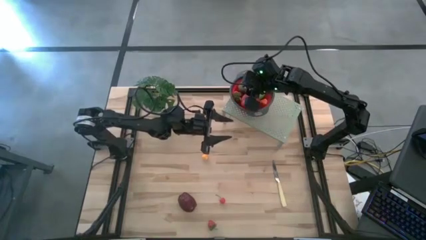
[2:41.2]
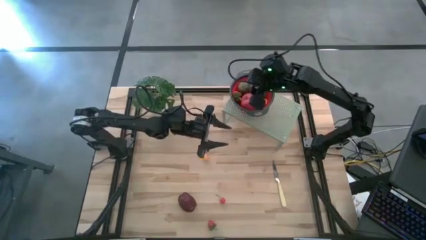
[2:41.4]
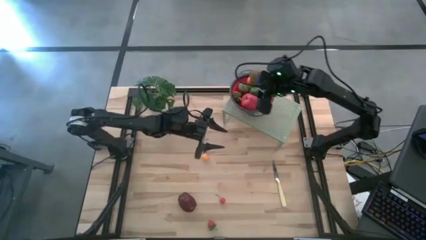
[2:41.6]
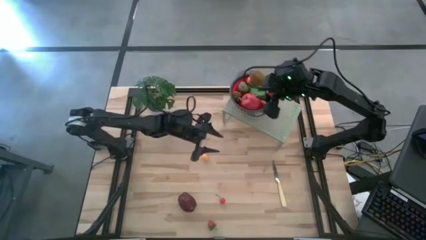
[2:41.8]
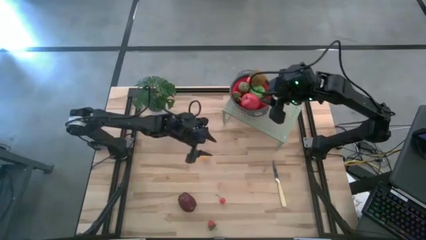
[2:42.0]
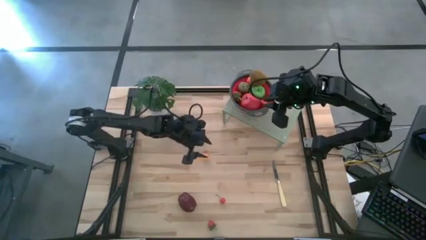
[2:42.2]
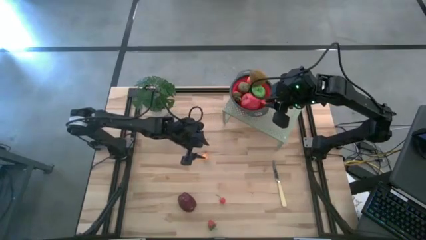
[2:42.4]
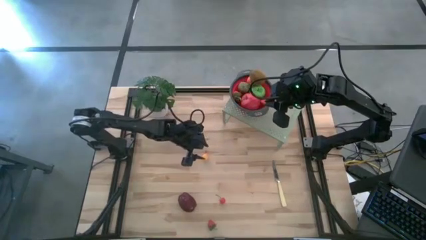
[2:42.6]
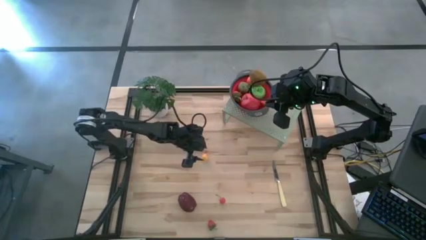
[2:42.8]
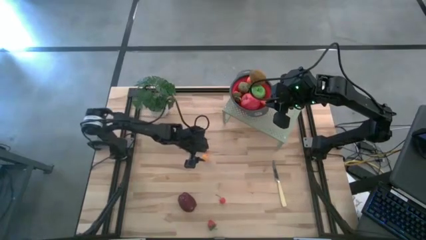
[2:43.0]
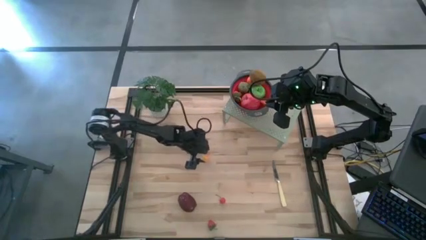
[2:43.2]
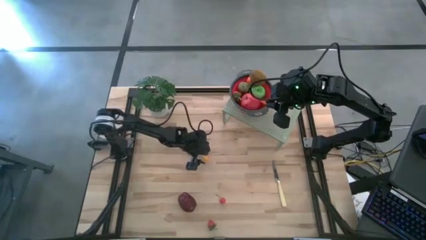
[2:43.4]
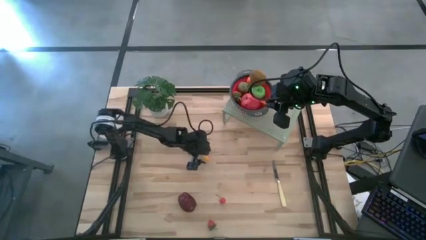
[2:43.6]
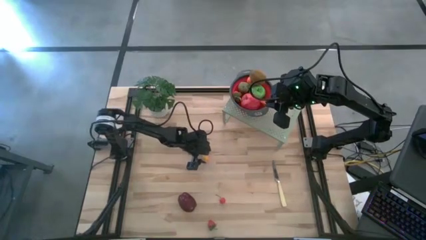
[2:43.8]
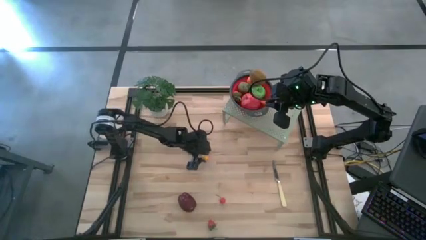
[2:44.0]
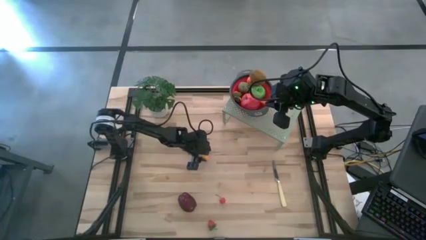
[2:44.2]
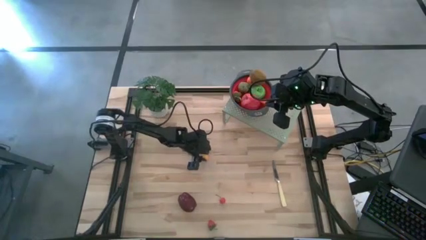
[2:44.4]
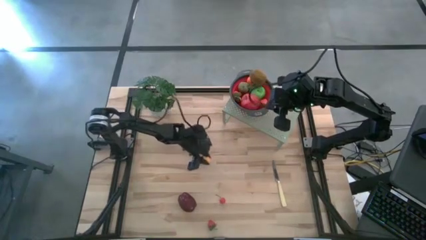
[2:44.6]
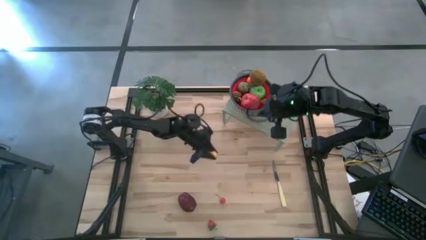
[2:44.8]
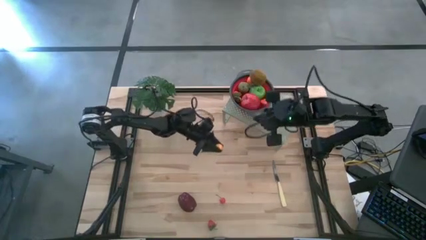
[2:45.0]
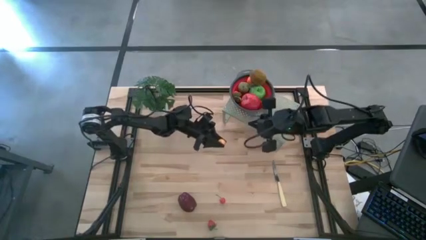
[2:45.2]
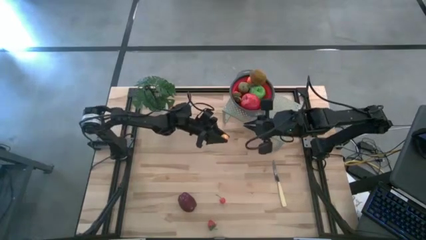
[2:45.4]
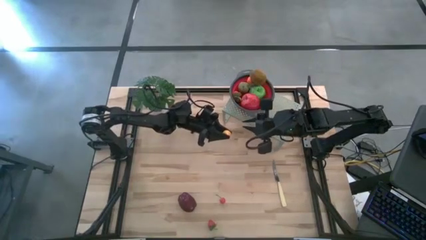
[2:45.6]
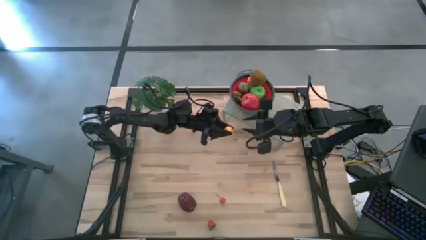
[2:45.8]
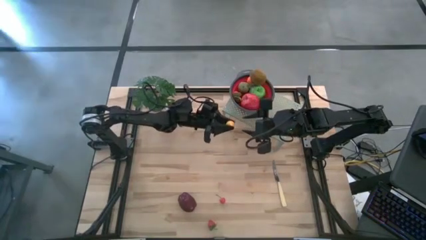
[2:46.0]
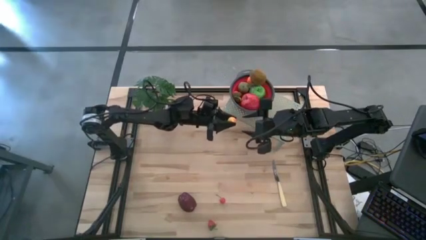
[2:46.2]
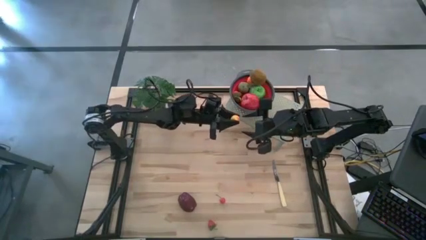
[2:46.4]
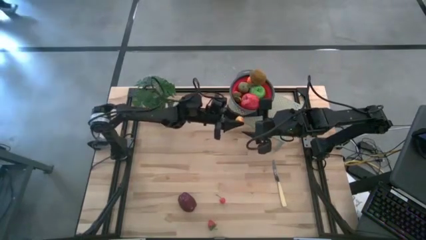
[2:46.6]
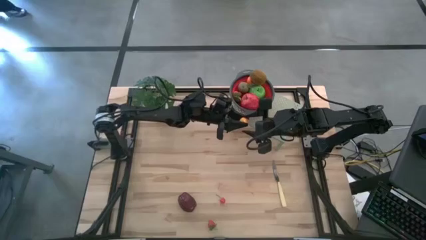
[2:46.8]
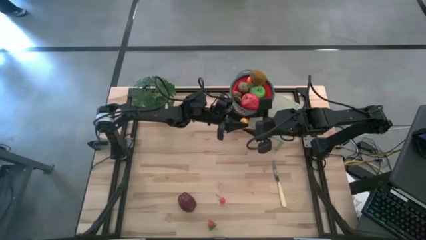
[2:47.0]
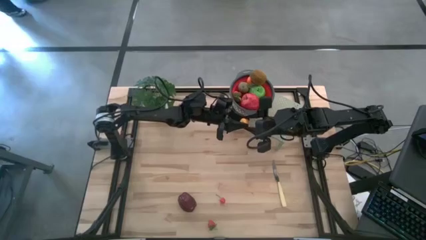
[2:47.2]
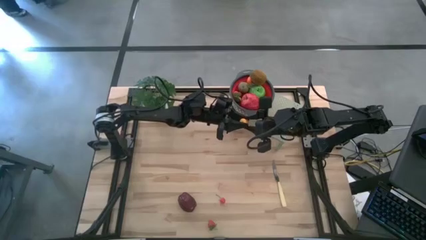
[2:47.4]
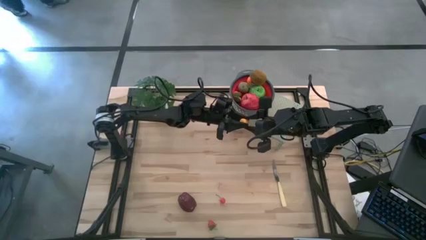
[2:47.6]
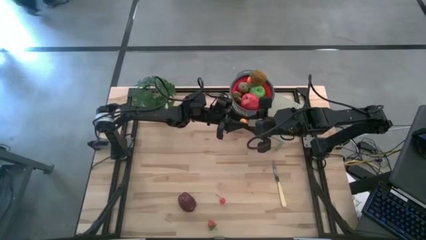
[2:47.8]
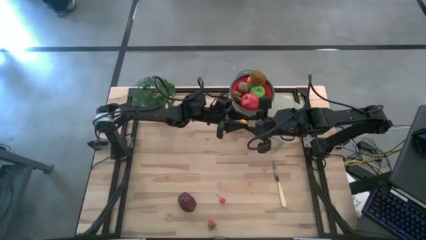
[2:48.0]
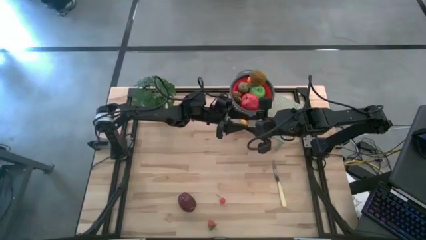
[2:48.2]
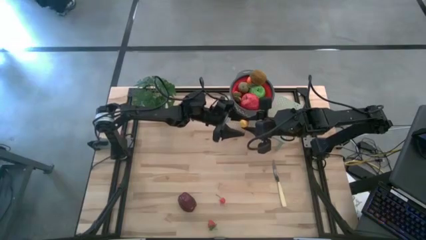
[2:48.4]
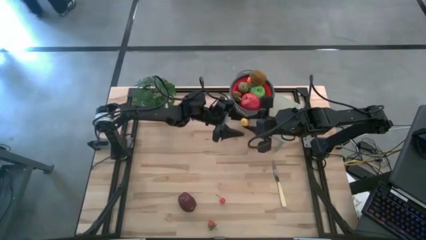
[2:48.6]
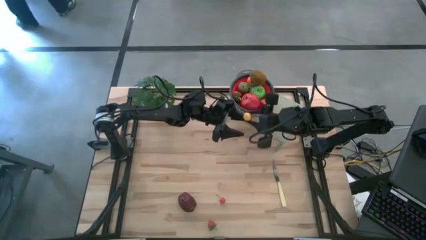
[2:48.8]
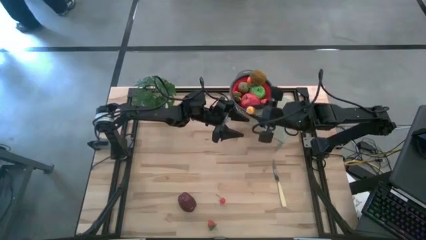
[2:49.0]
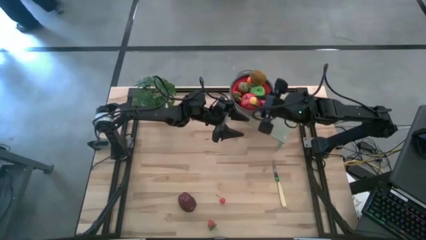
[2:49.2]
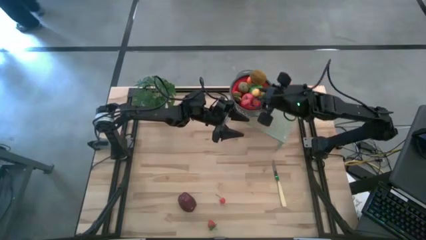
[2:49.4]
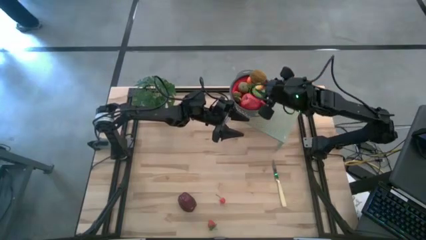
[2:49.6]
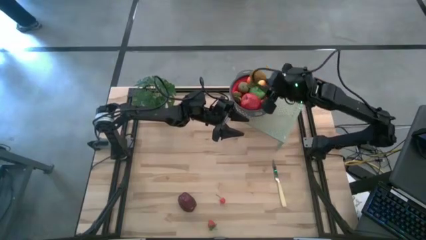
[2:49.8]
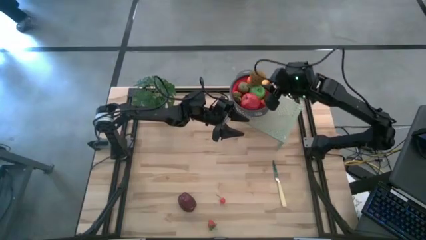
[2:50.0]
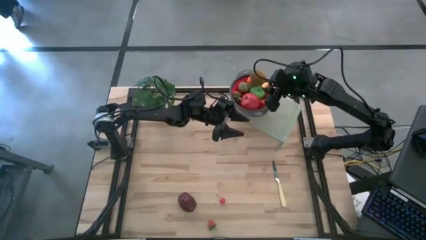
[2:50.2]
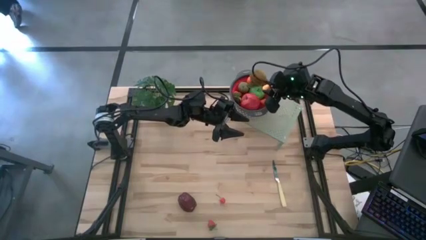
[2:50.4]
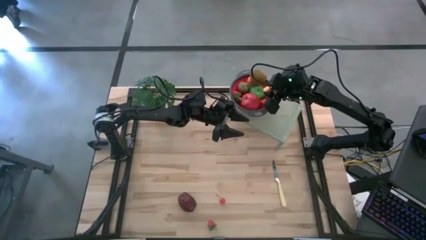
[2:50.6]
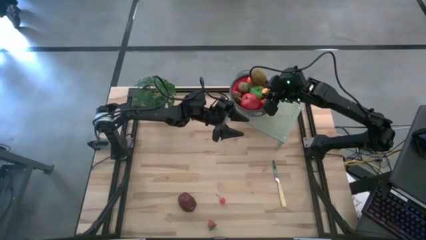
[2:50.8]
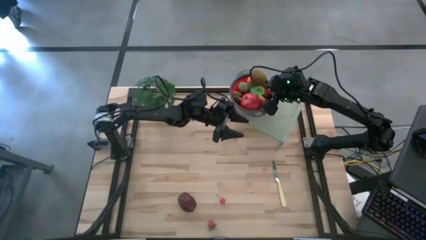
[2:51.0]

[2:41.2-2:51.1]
Task: Pick & Place Fruit
Put the yellow pear into the red strainer bowl

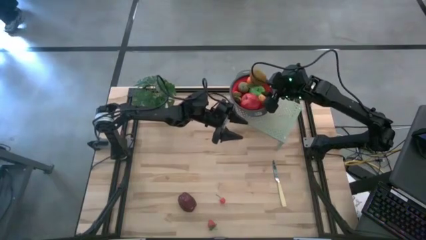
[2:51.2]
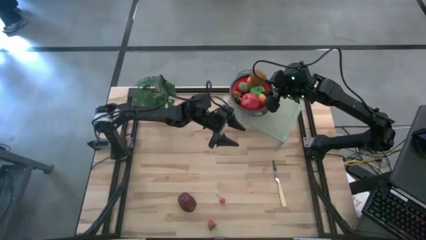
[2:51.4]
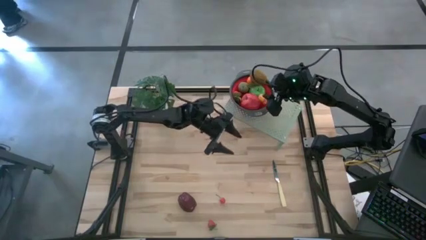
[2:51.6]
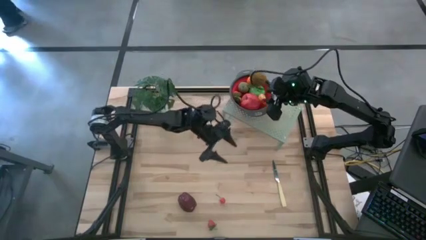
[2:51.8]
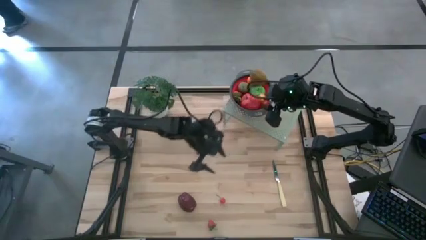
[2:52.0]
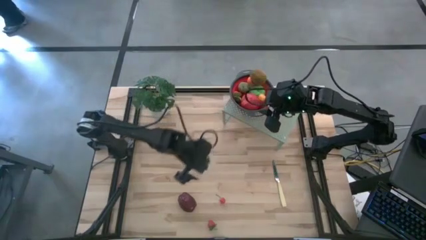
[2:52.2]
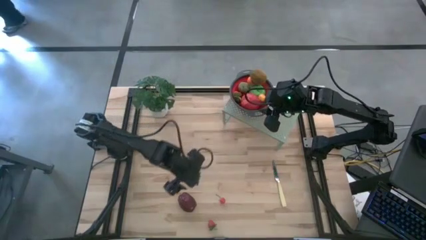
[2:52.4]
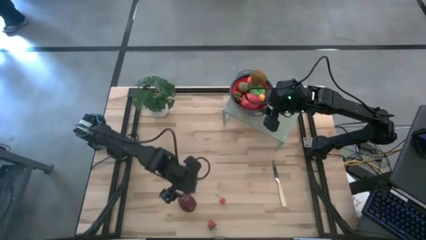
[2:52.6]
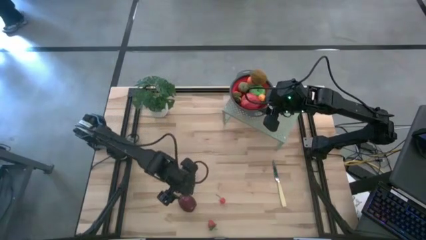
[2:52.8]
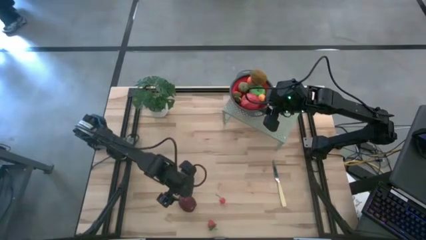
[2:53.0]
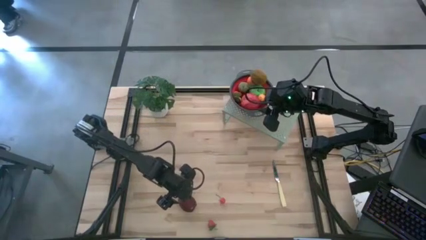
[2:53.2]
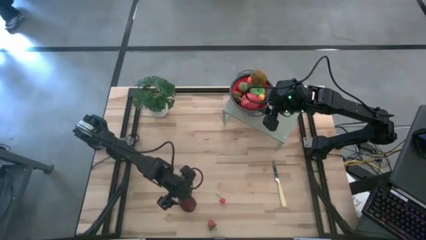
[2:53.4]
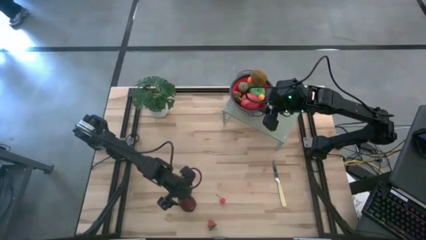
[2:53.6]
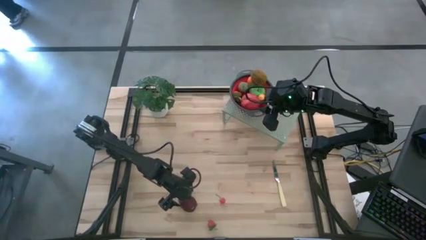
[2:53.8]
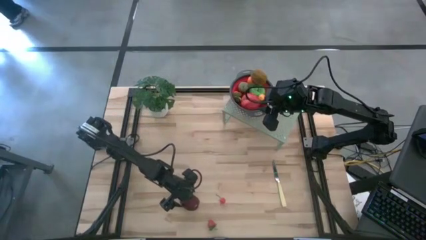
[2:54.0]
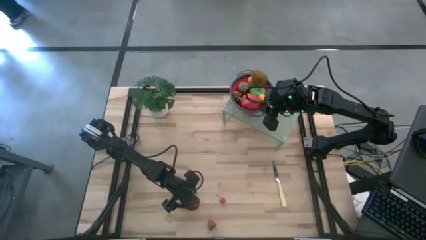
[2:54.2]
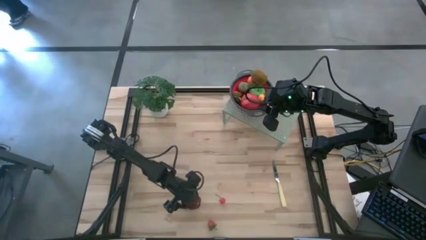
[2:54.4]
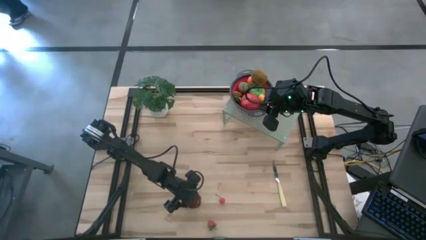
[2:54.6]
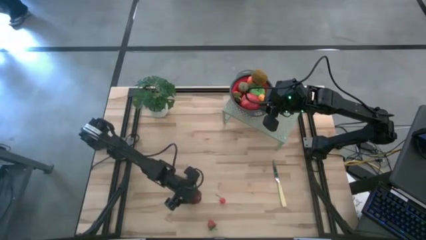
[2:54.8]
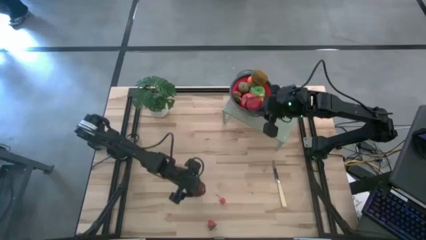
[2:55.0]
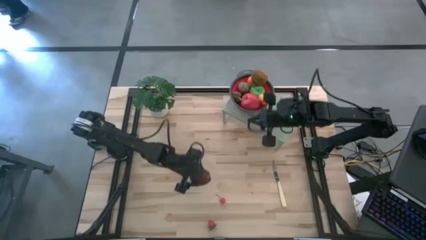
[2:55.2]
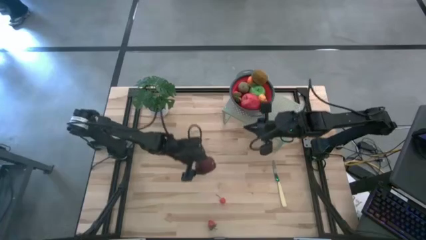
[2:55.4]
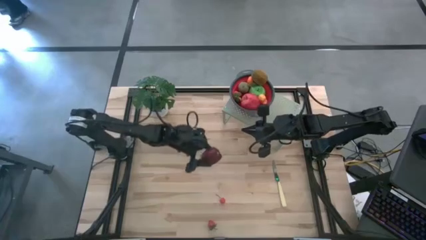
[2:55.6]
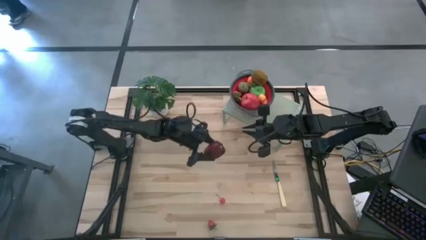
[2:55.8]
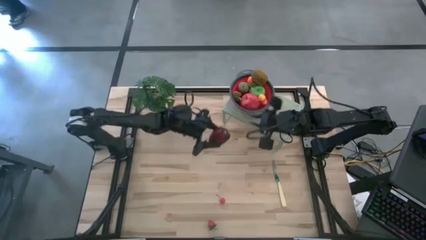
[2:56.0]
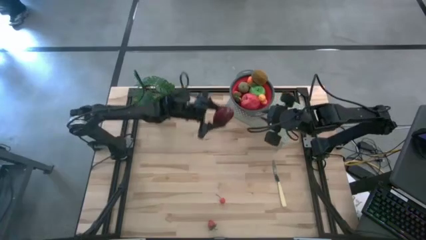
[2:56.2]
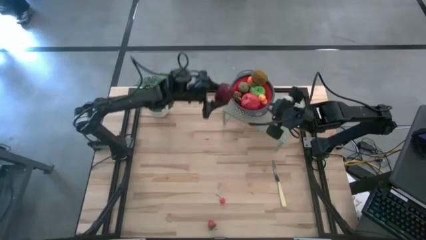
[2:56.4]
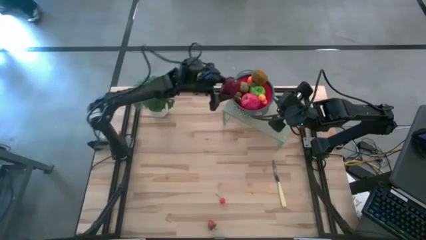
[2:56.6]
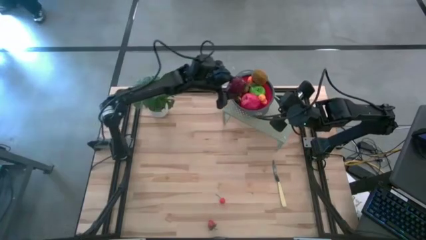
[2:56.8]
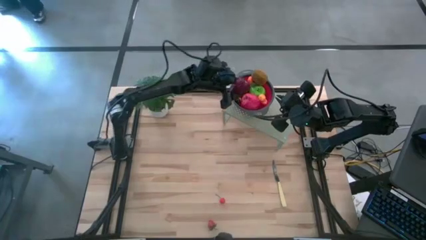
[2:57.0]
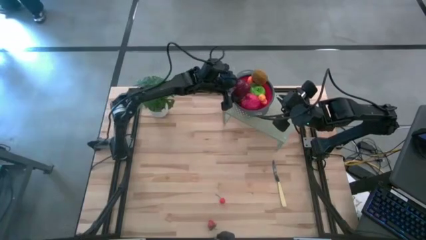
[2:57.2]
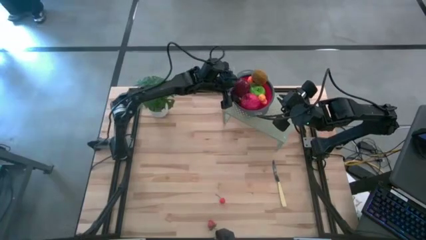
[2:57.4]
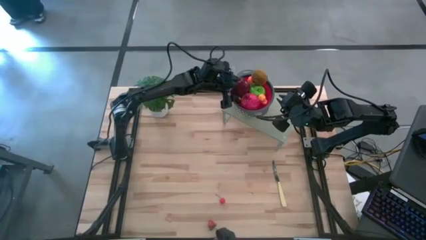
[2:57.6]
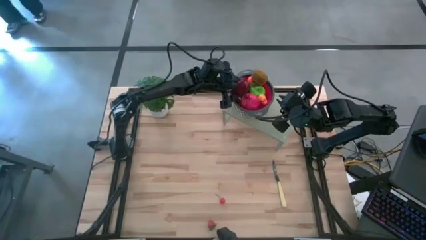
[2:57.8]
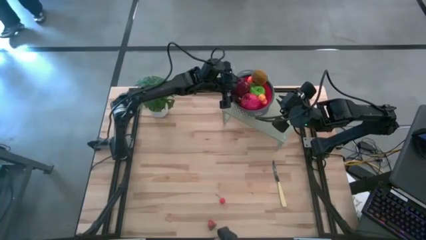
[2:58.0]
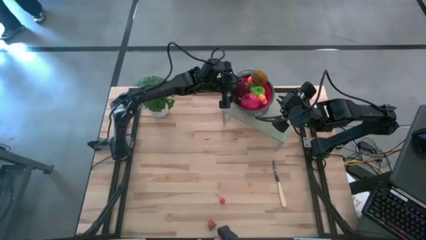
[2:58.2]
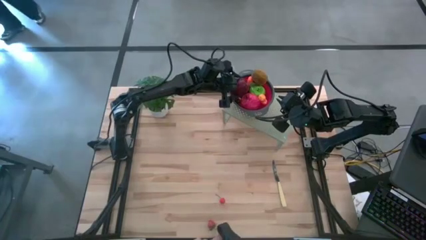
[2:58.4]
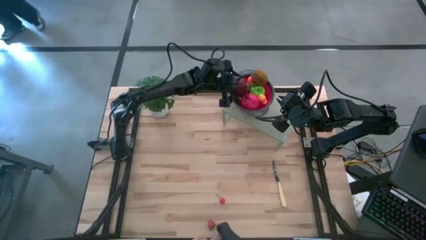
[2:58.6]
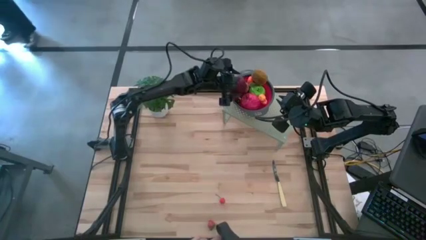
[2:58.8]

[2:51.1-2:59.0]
Put the dark red apple into the red strainer bowl
